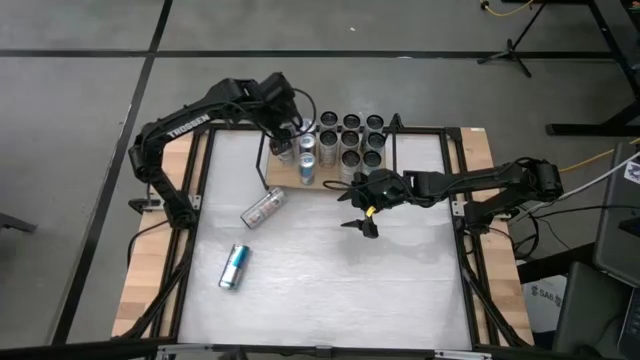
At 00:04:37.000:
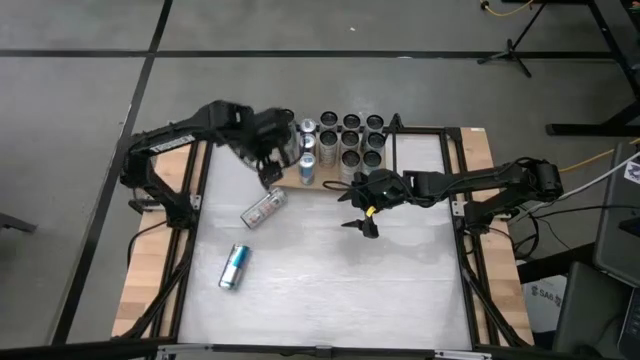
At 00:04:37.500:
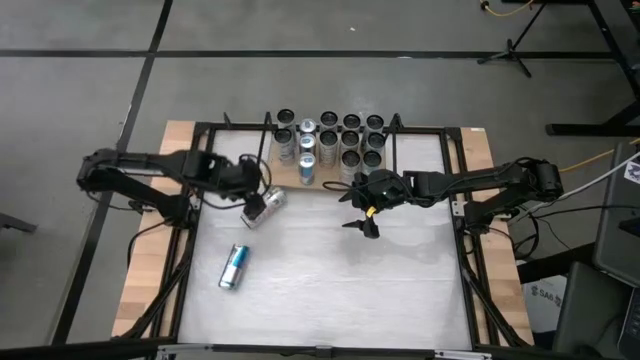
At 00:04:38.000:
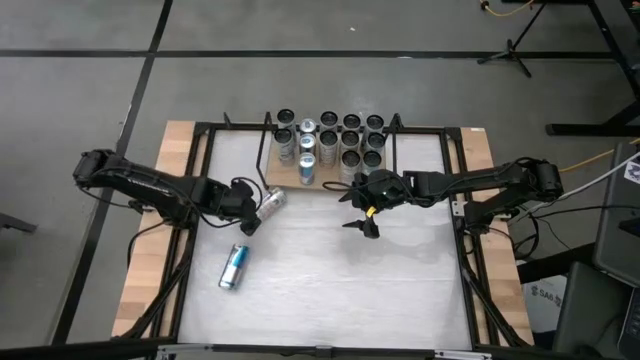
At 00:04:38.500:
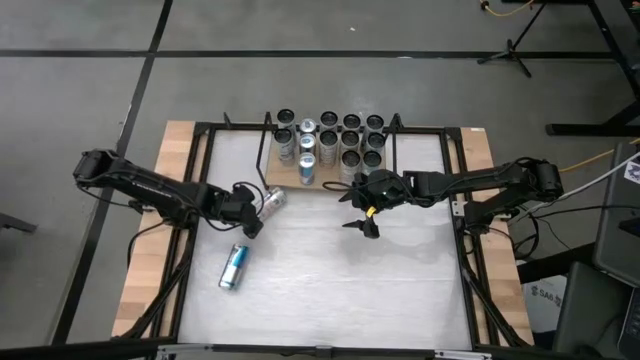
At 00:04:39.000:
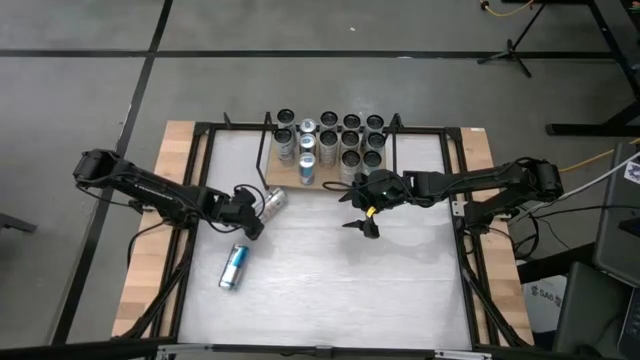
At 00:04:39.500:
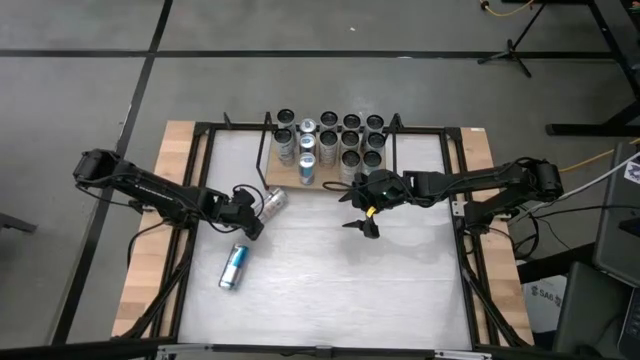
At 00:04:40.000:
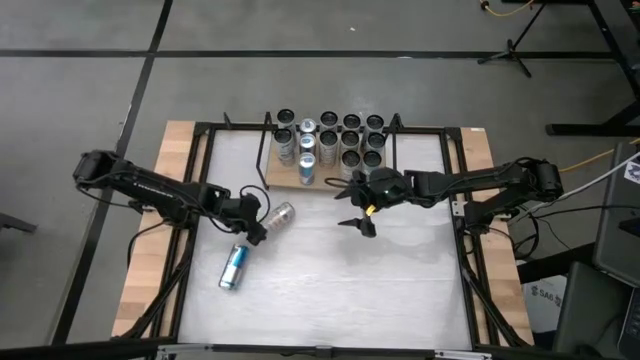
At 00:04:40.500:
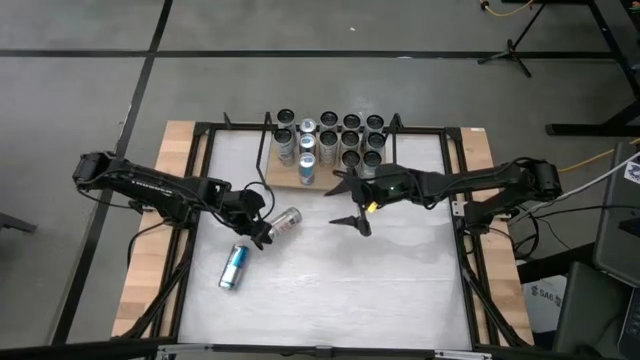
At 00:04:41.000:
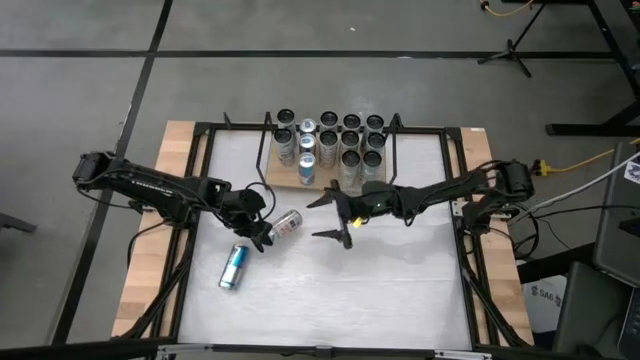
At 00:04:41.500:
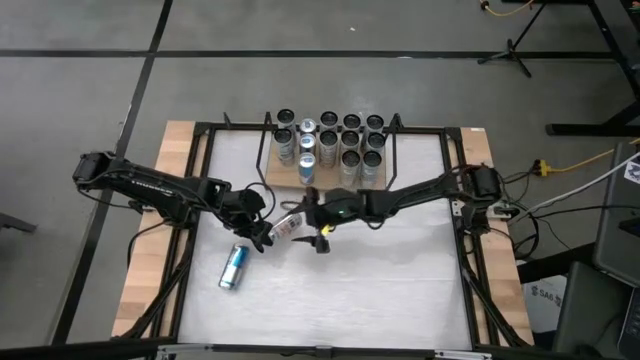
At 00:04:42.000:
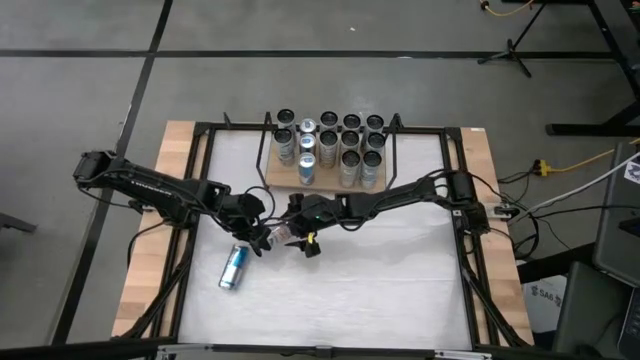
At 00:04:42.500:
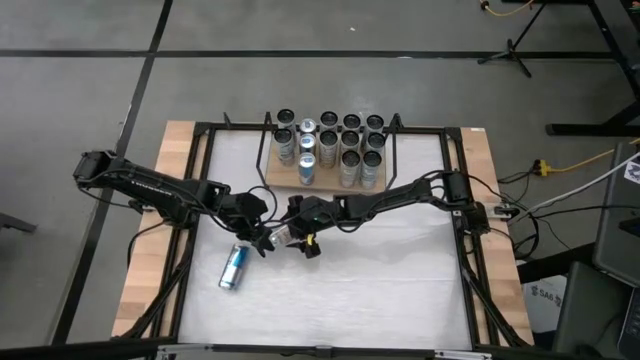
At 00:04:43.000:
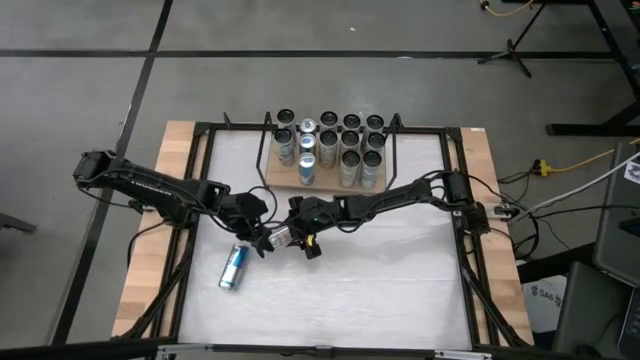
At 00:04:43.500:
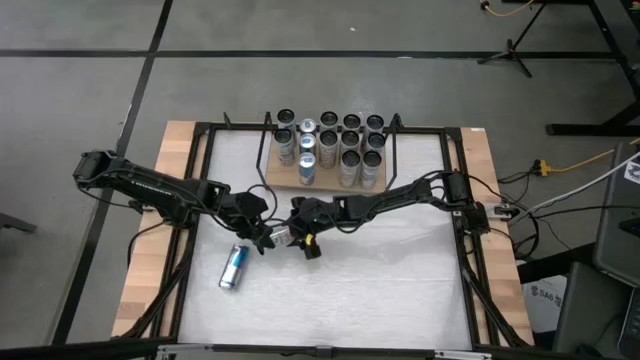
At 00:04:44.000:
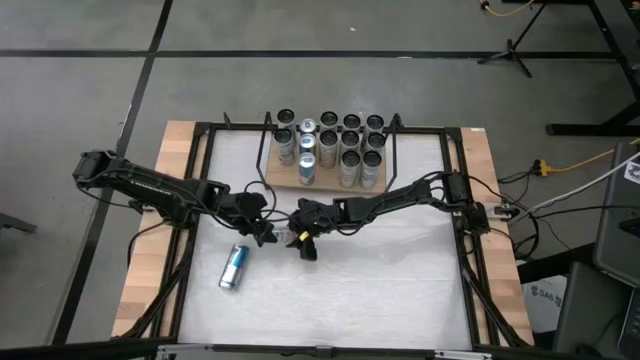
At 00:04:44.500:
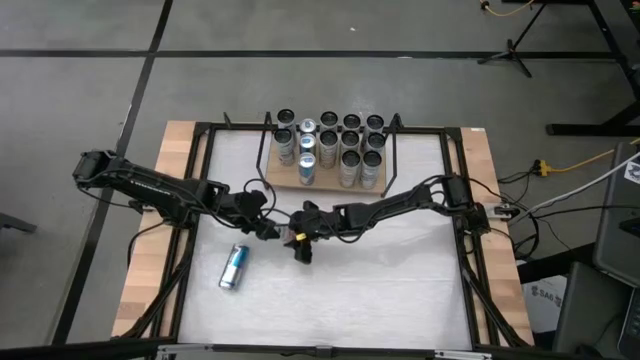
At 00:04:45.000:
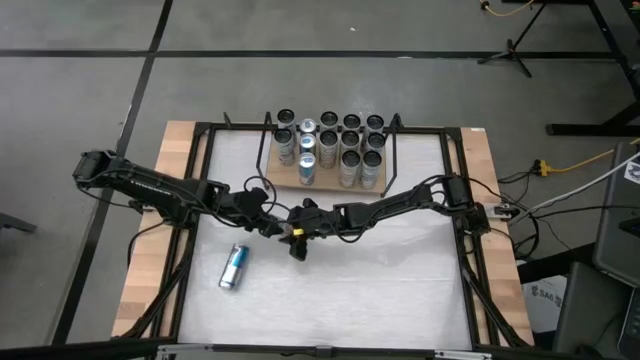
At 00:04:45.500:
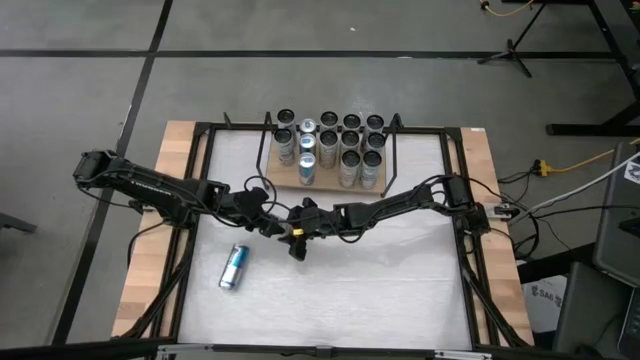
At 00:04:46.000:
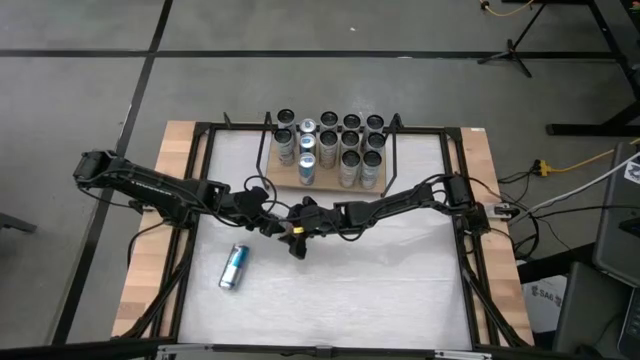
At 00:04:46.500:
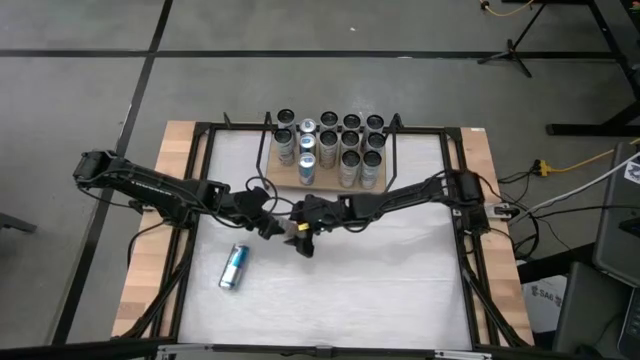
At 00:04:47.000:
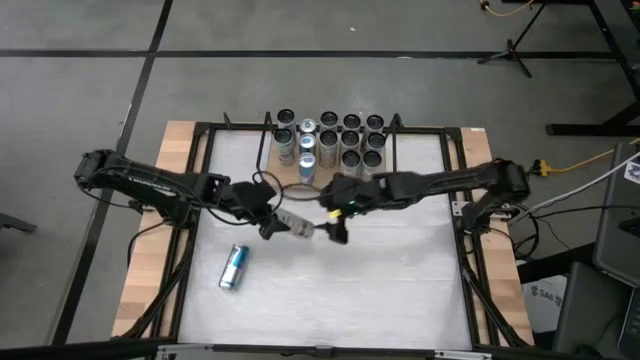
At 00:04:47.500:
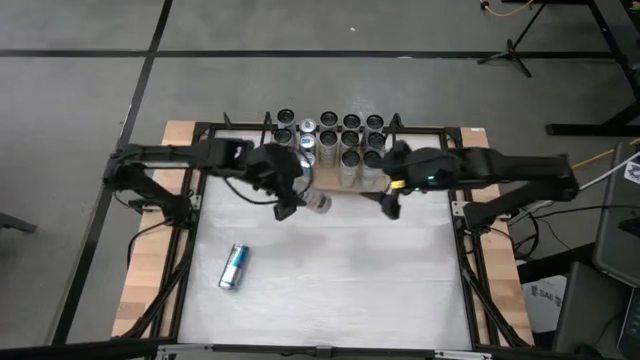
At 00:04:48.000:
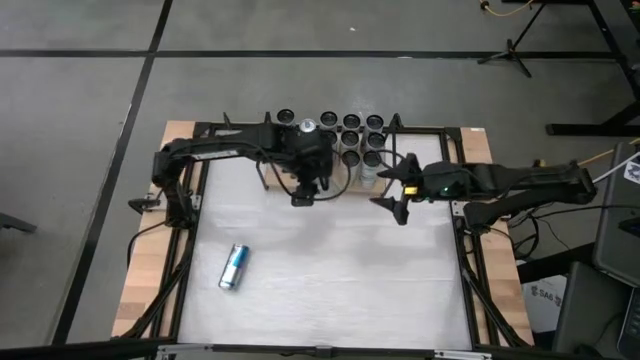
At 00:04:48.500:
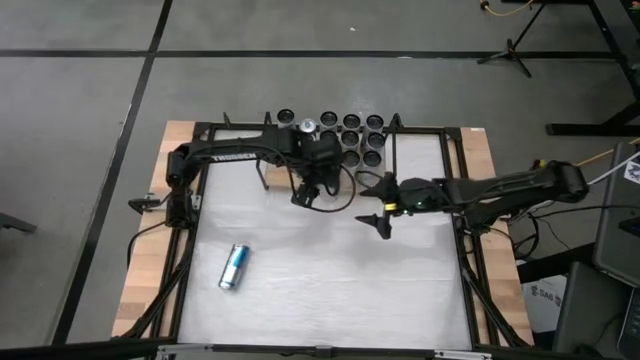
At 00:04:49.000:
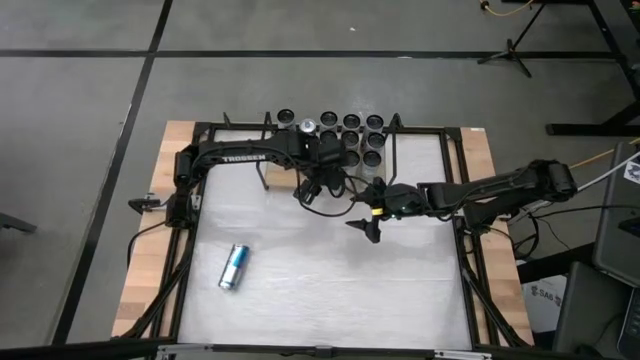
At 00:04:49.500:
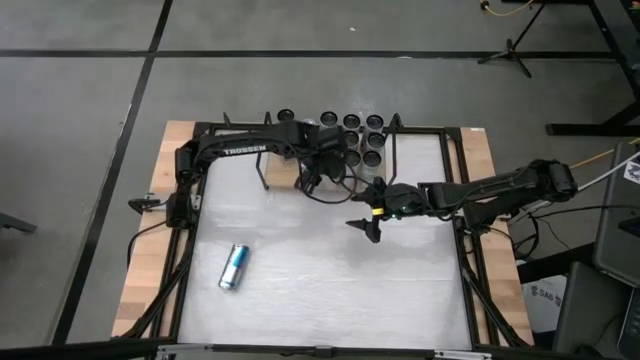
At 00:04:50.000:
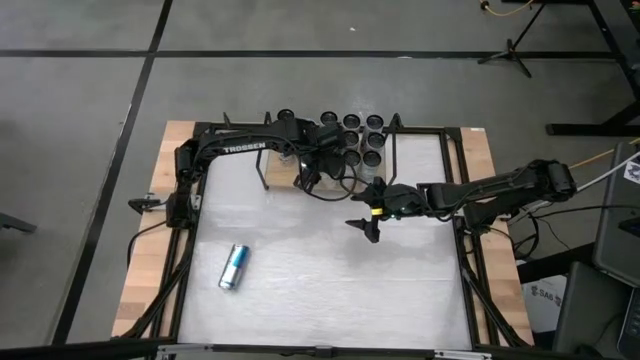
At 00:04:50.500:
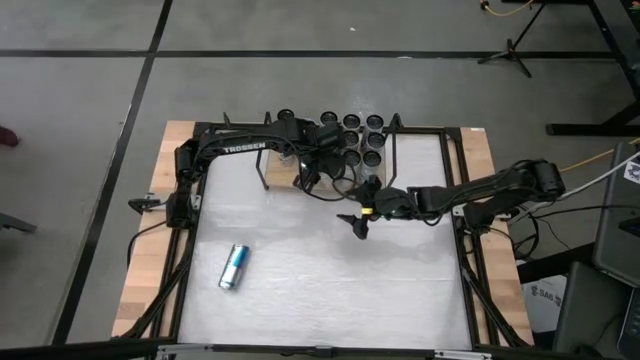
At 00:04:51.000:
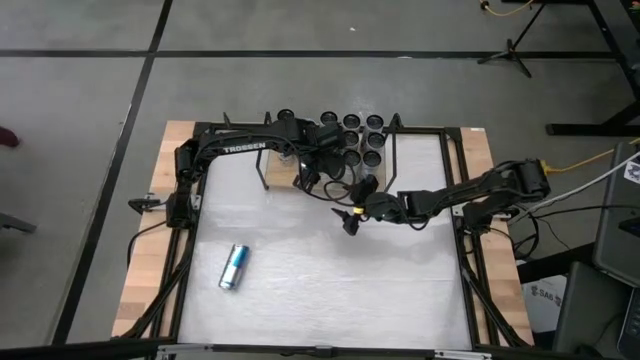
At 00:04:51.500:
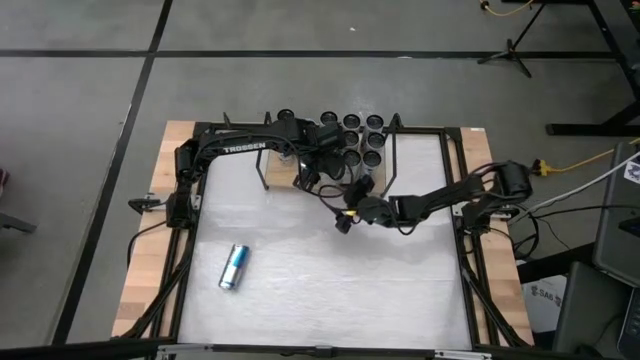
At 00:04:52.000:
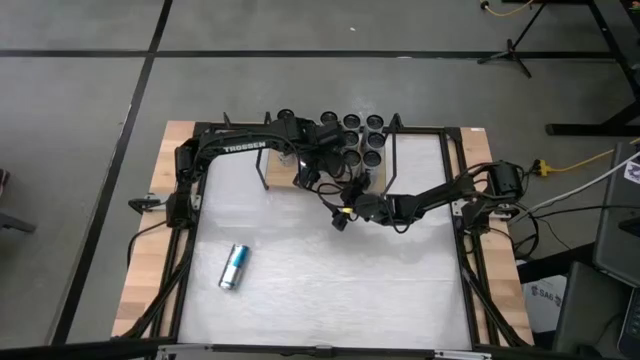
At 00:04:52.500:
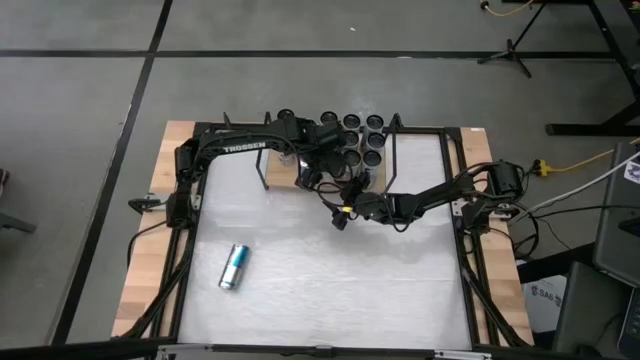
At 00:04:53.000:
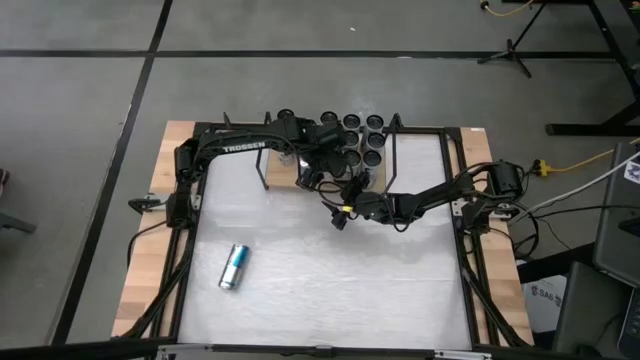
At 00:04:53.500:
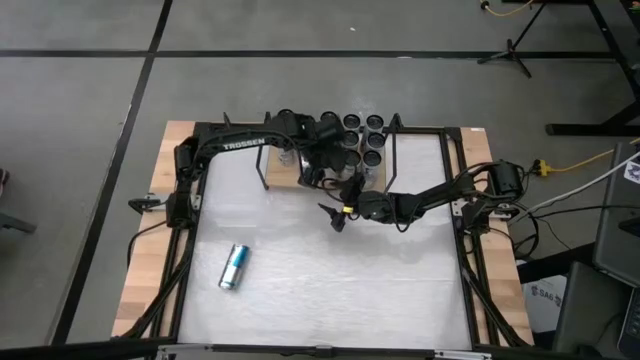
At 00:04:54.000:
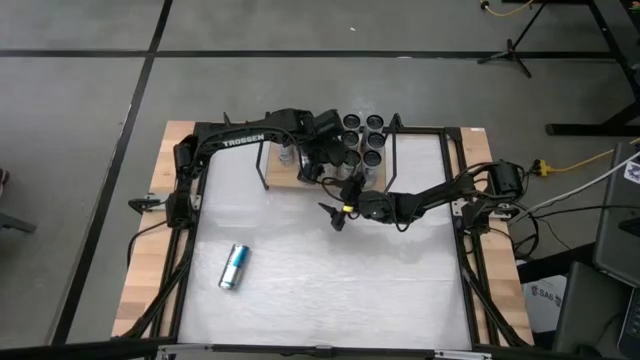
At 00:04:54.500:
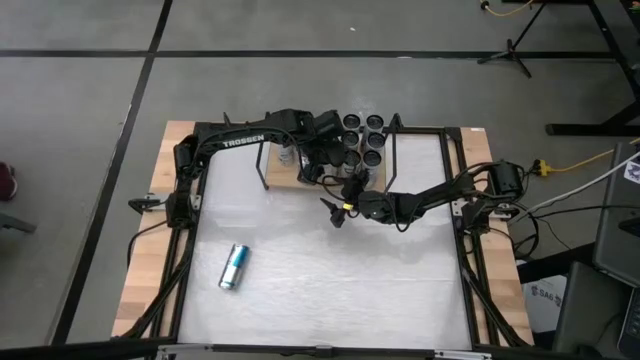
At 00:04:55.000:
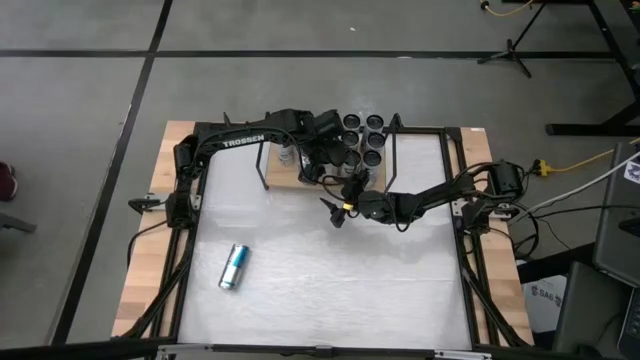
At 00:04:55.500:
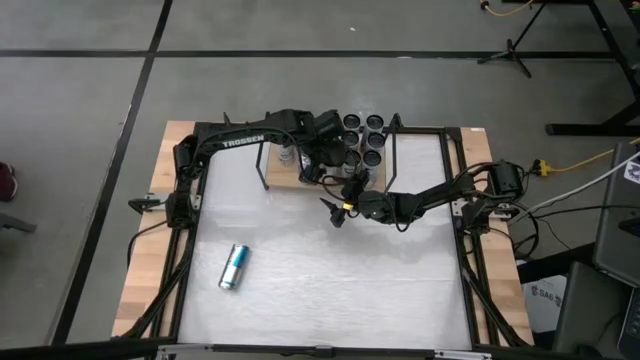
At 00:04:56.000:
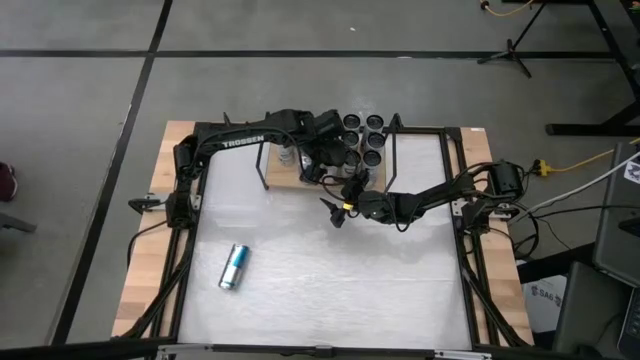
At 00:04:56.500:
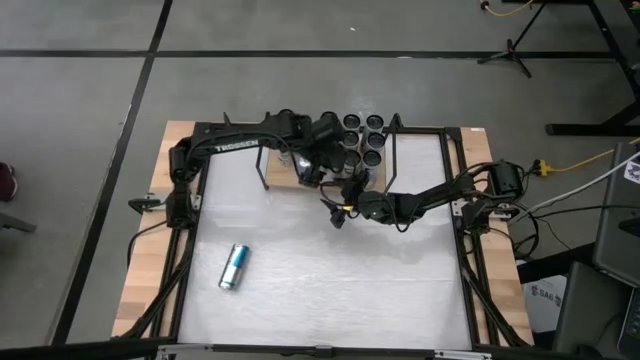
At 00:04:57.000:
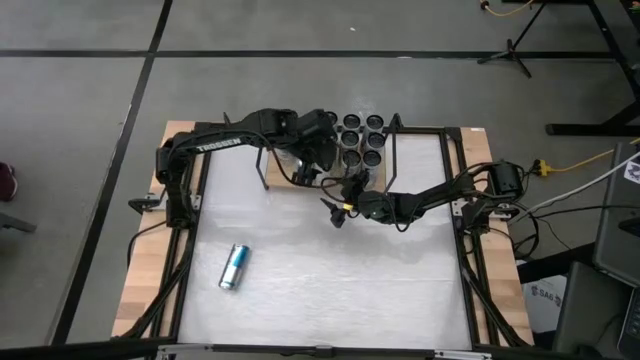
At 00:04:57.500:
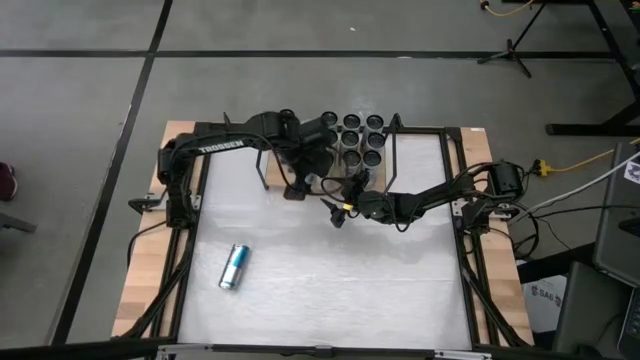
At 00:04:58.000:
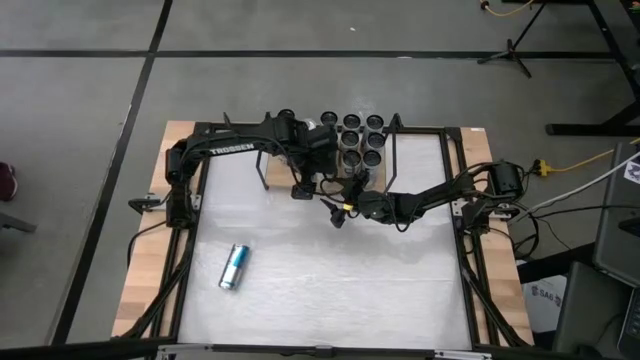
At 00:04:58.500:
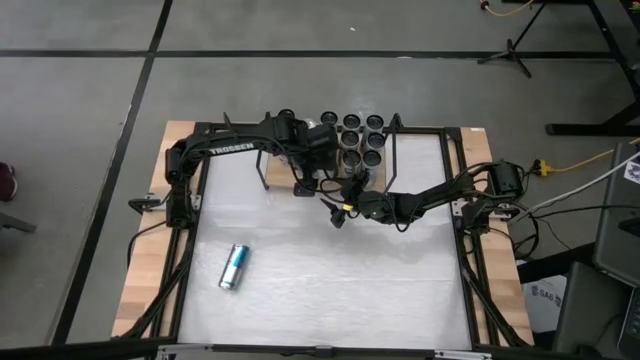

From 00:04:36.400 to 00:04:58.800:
Task: Place canned beverage on shelf
Put the white soda can aligned with the other white soda can on the shelf
